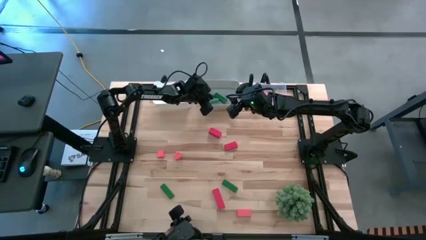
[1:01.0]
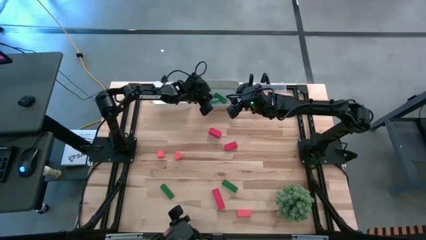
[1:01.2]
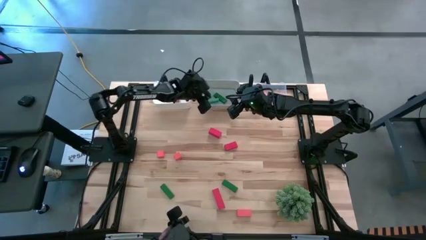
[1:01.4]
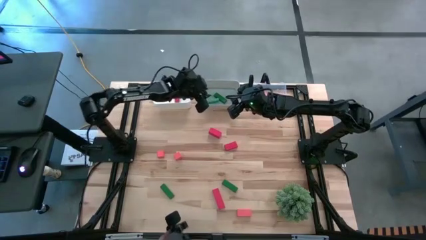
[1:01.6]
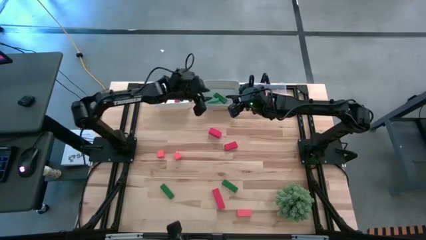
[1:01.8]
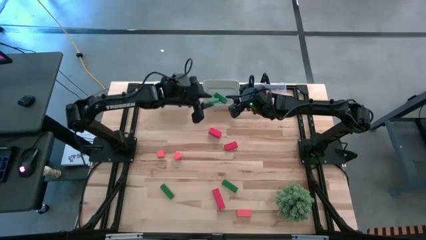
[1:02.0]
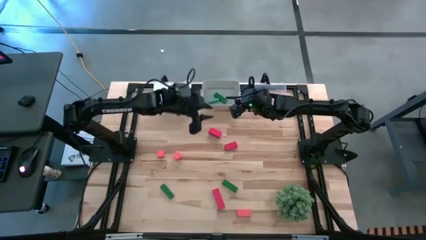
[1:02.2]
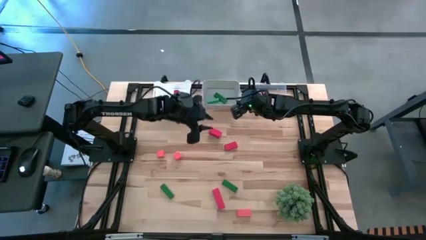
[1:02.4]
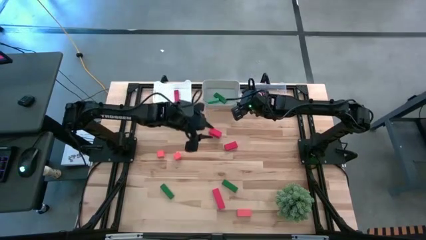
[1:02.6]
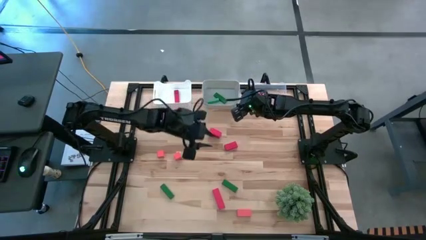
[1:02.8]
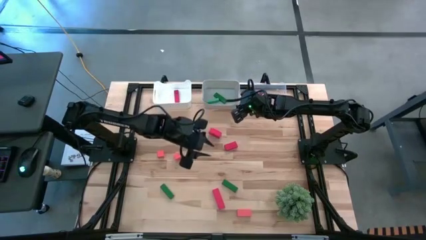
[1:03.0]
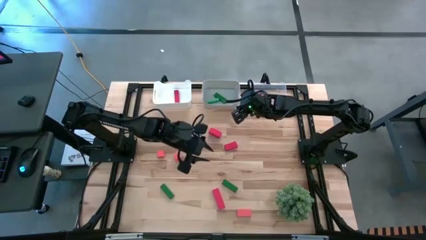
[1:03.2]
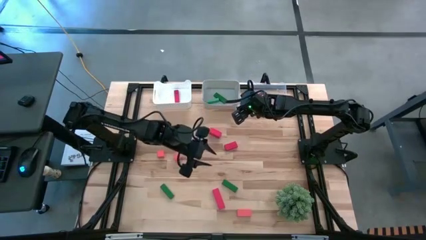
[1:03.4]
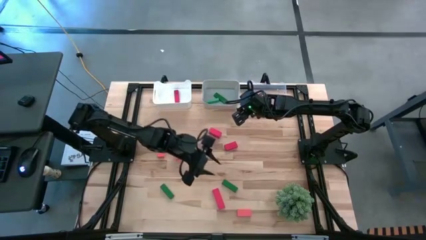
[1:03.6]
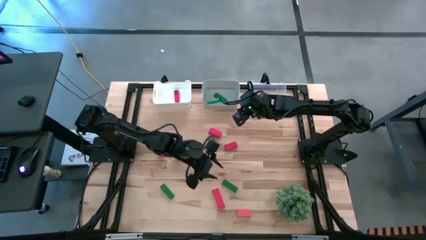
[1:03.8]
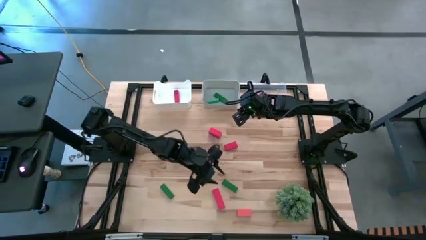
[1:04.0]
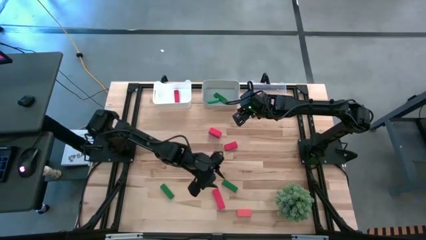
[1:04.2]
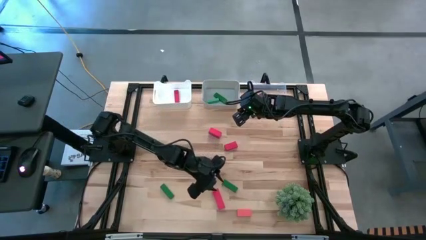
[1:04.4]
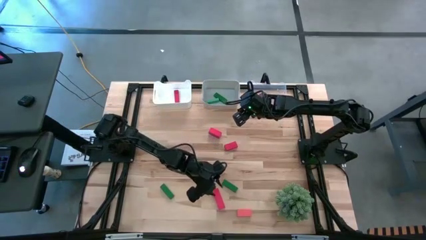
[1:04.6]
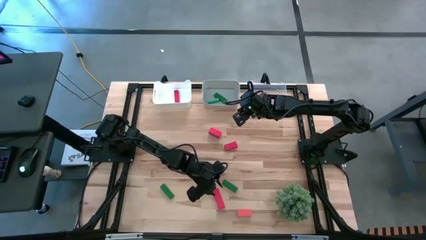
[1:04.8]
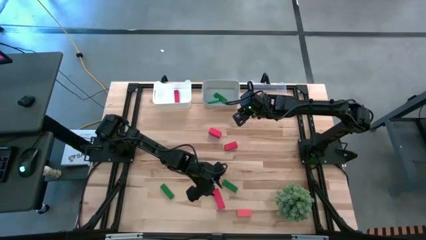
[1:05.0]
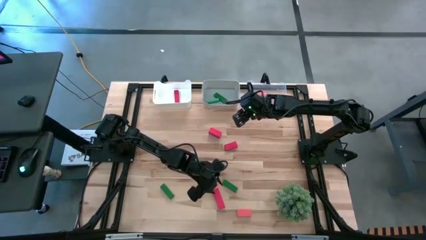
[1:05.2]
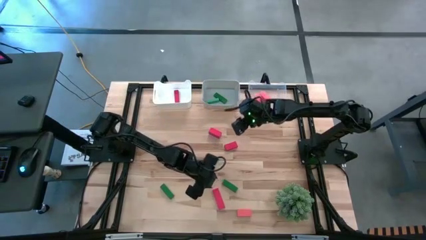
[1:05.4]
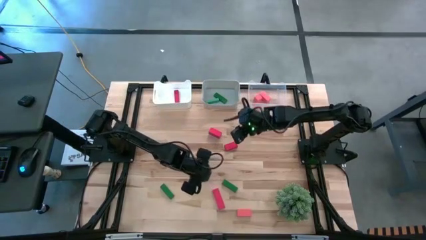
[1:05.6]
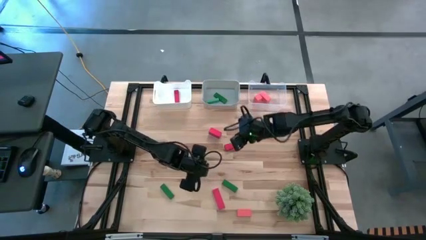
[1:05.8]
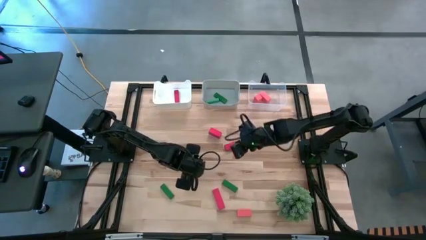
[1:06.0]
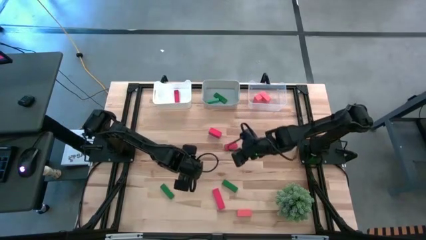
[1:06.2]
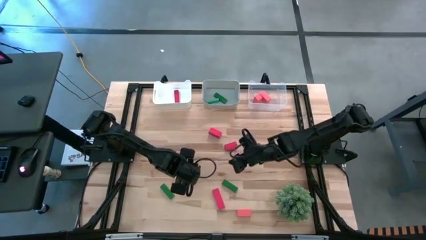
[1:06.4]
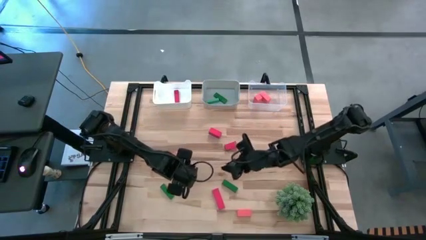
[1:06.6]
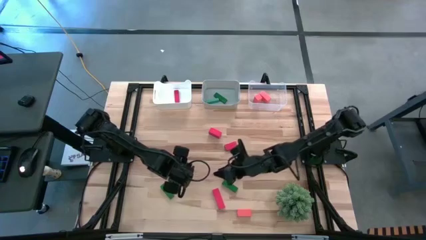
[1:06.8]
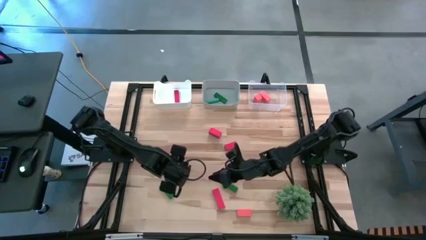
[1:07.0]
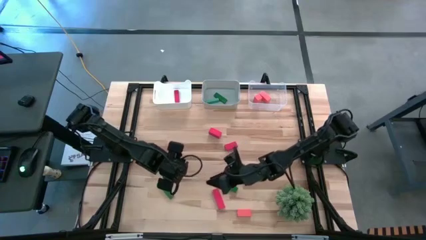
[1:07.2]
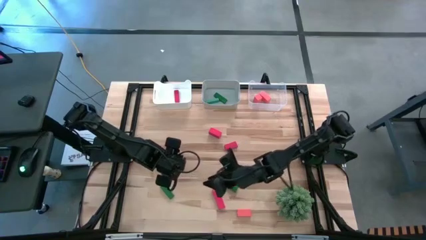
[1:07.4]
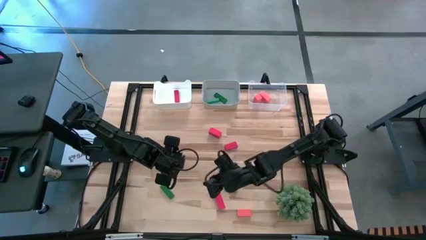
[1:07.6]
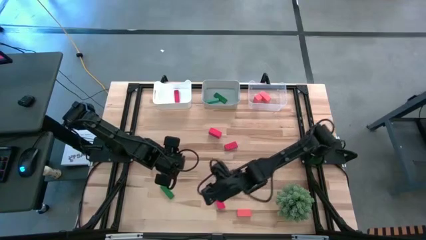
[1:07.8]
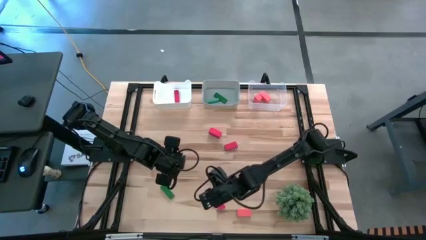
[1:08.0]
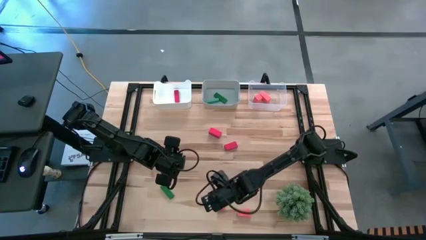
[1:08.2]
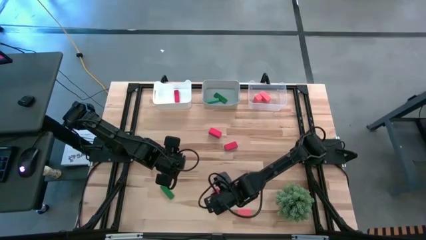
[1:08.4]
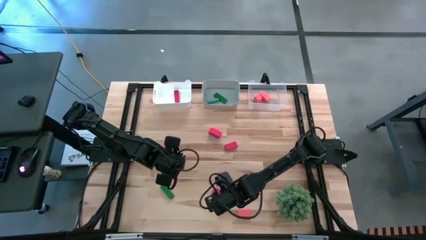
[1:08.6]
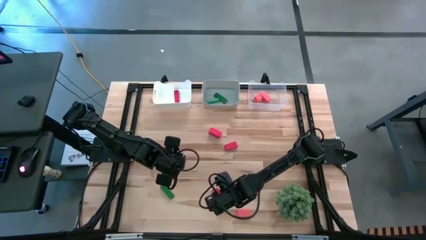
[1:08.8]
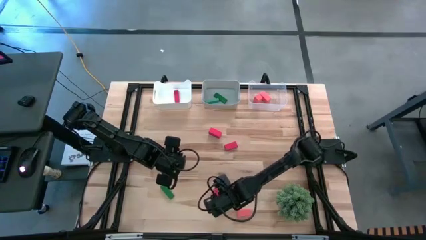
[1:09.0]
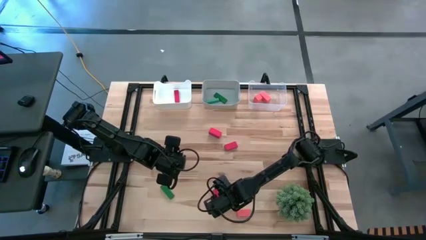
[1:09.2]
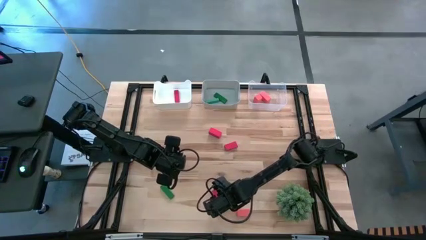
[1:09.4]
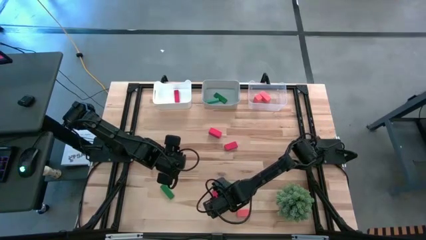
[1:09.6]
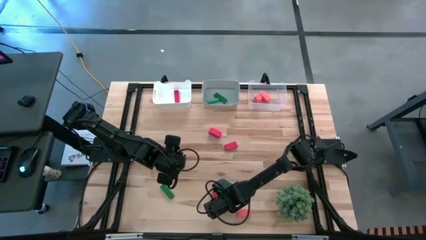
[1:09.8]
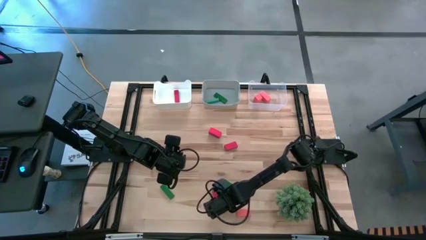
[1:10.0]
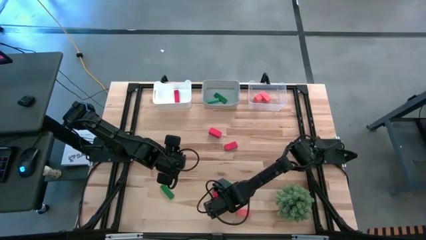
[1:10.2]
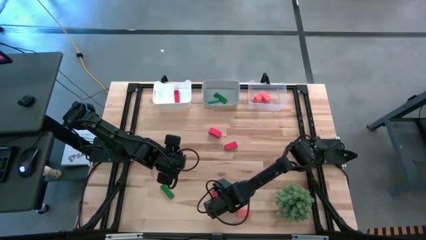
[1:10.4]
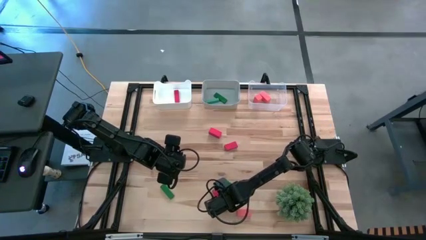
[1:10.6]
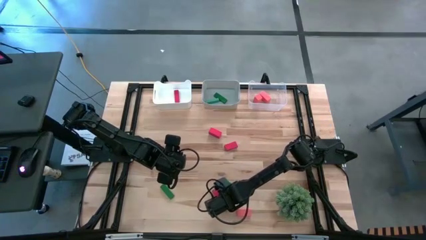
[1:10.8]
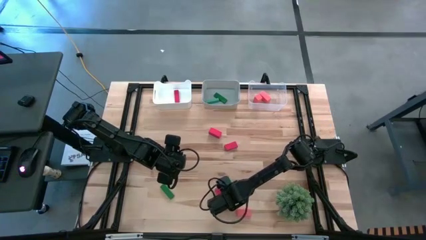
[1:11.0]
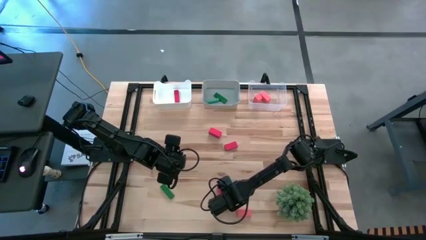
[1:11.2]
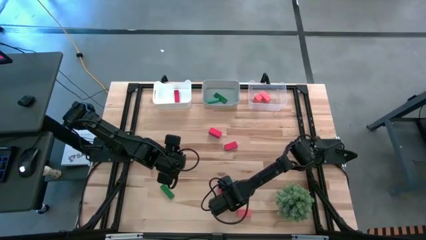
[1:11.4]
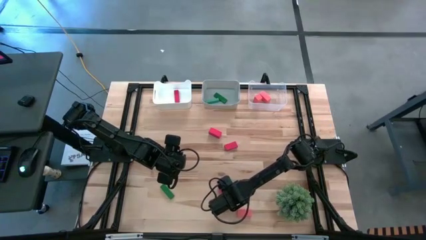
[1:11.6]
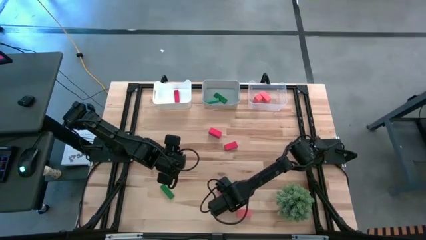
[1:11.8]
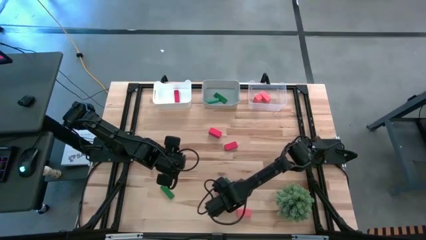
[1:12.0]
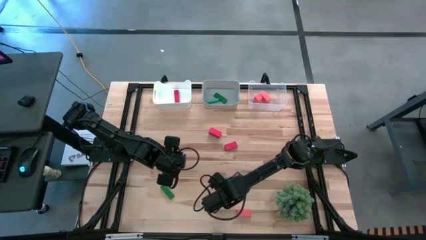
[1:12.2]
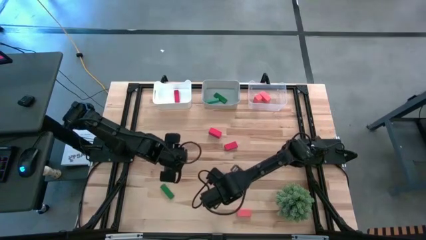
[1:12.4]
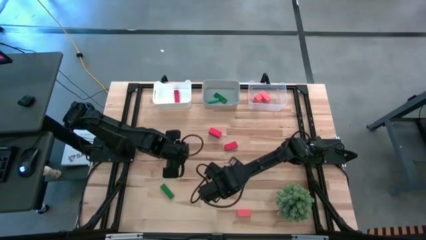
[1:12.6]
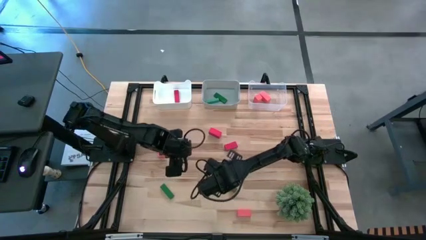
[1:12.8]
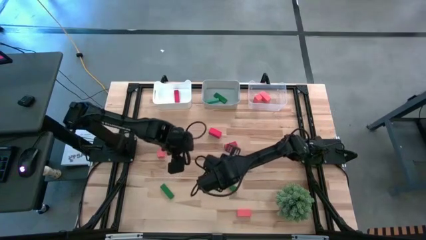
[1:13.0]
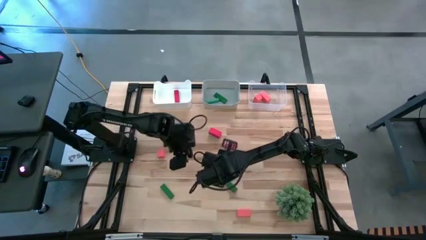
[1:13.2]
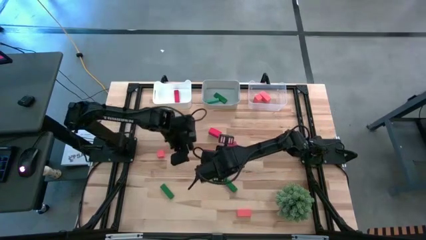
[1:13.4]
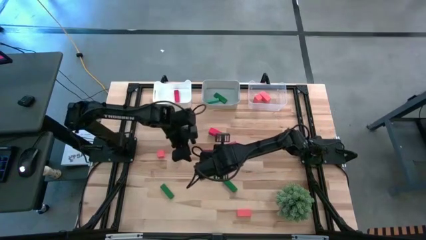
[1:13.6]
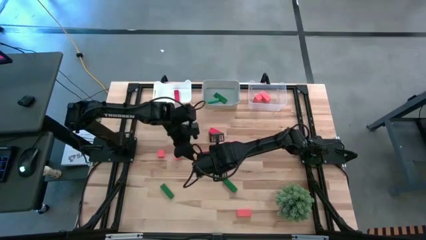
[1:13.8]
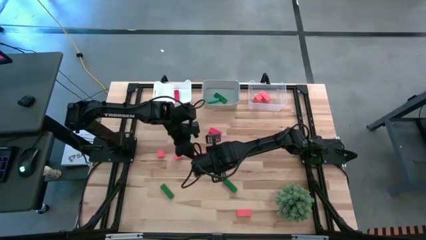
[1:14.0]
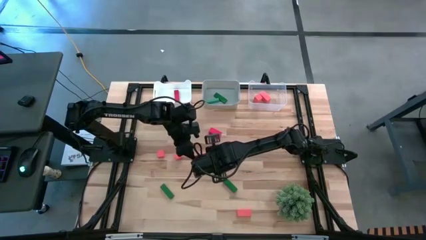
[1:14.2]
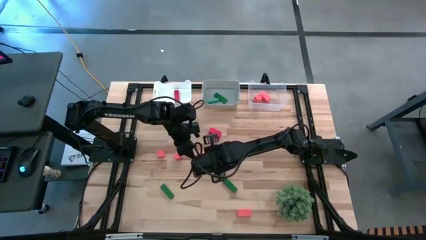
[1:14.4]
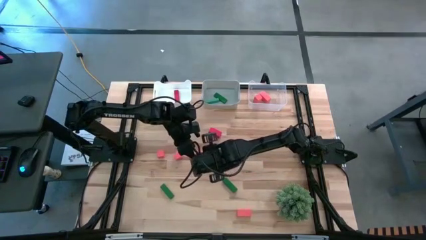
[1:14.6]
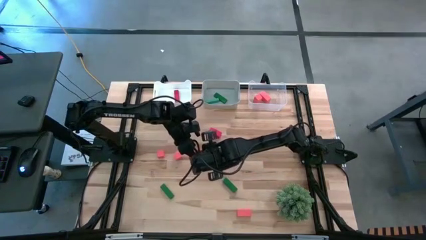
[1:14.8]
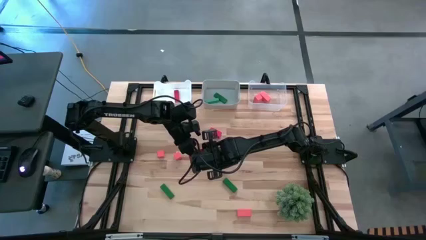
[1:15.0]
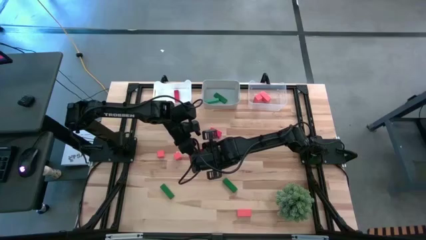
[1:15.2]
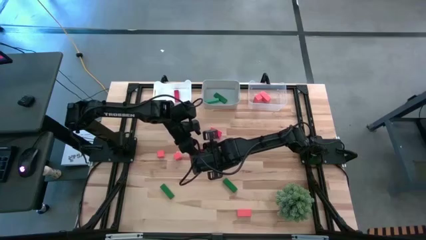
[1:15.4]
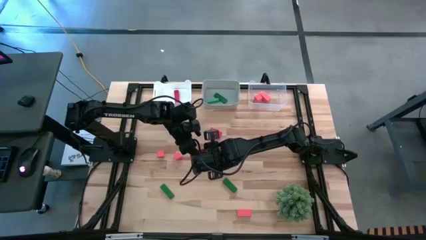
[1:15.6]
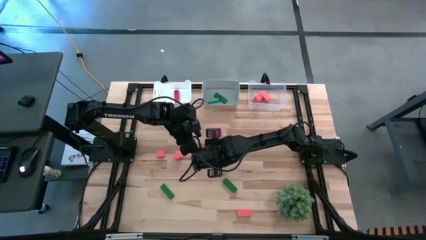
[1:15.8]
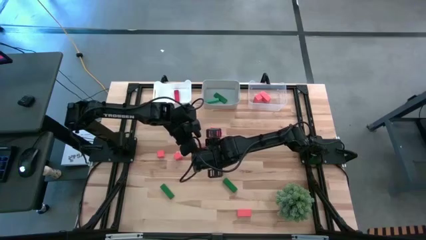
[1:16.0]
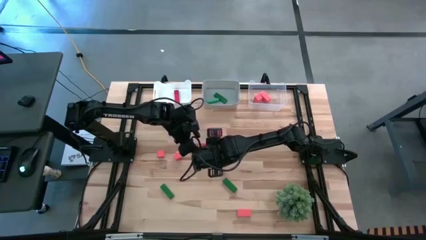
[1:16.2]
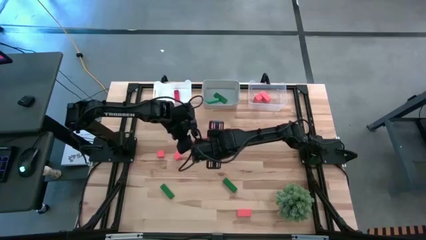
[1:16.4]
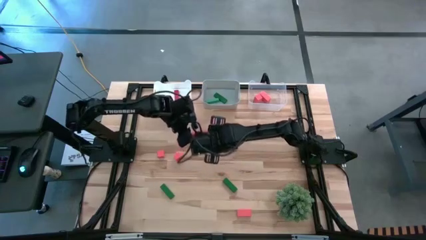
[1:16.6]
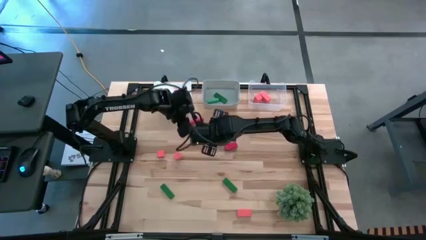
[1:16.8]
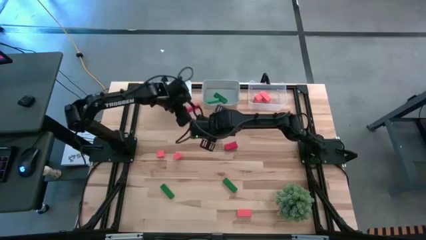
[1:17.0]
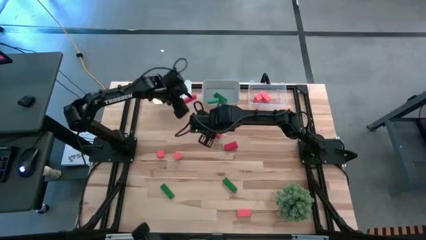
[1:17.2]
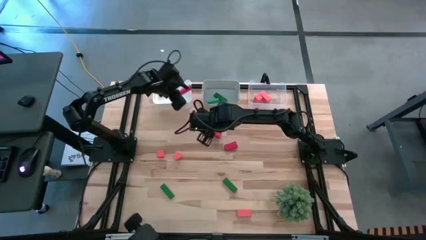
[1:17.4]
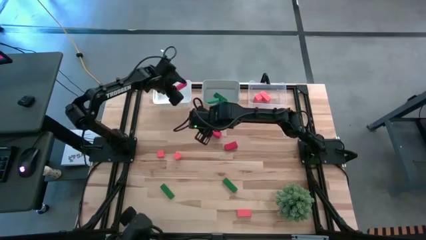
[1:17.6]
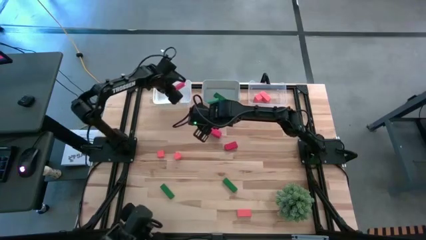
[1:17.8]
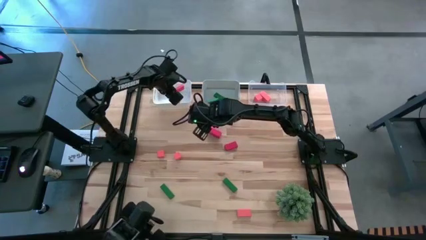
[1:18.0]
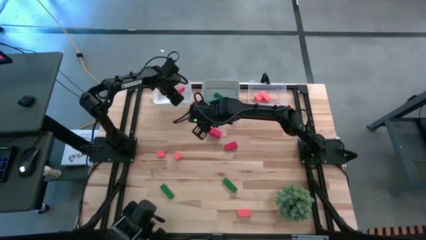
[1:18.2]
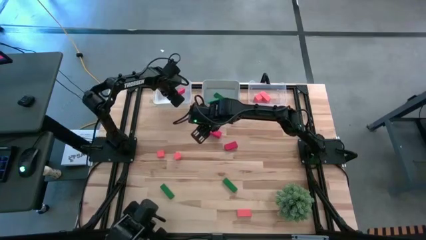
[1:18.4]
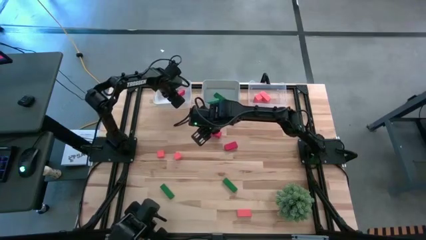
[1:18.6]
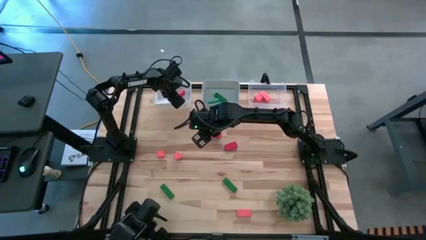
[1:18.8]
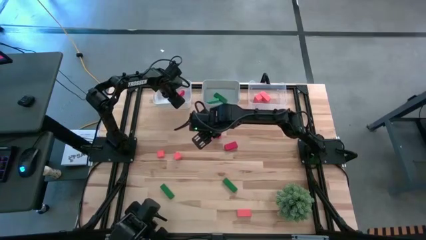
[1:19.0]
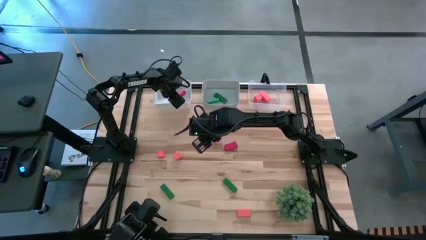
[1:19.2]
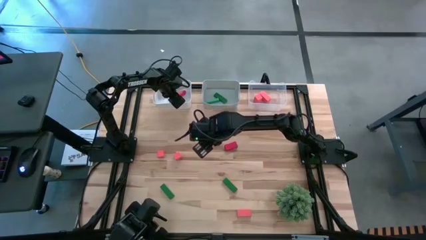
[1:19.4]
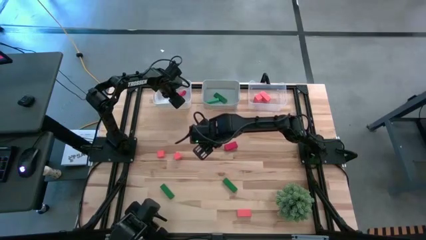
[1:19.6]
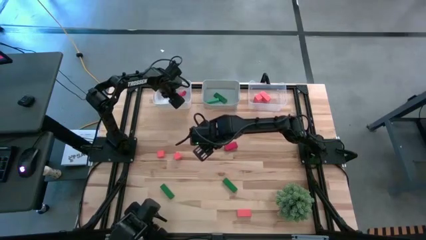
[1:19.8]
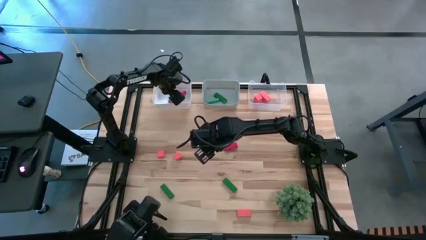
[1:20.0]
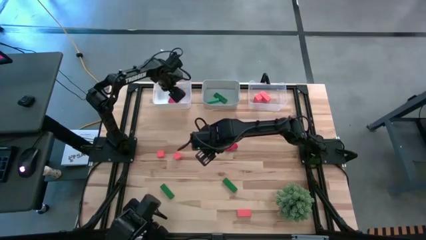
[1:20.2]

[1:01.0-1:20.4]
Task: Sort & place blocks by color
Put the bottom red block into the white bin
